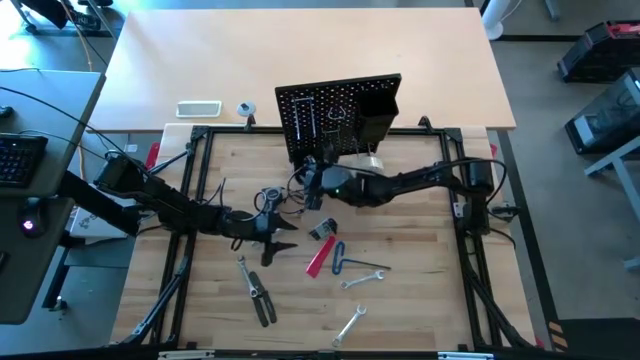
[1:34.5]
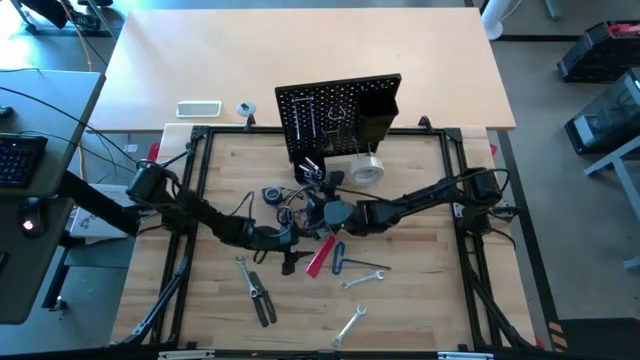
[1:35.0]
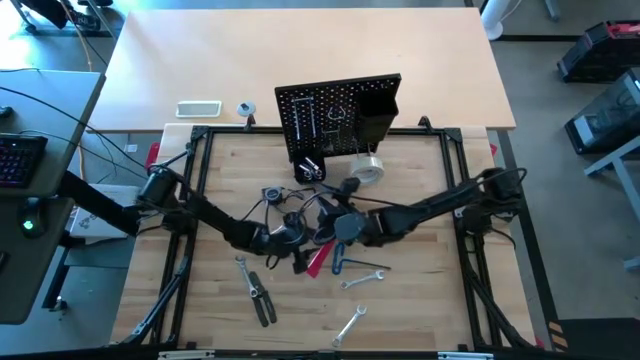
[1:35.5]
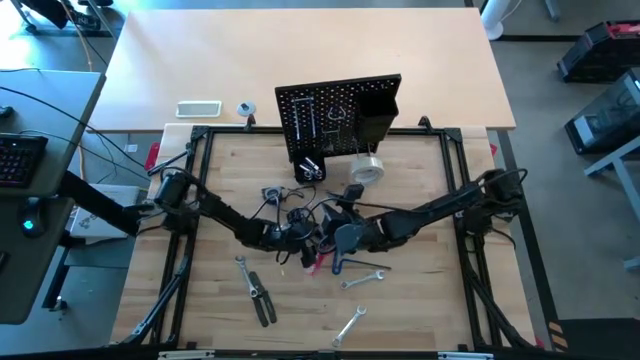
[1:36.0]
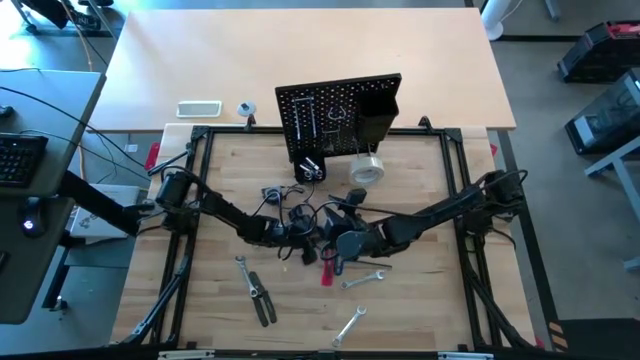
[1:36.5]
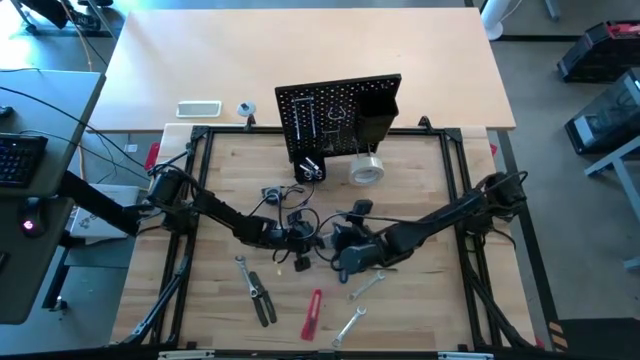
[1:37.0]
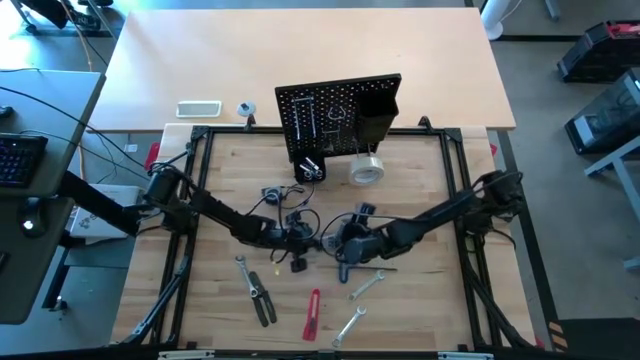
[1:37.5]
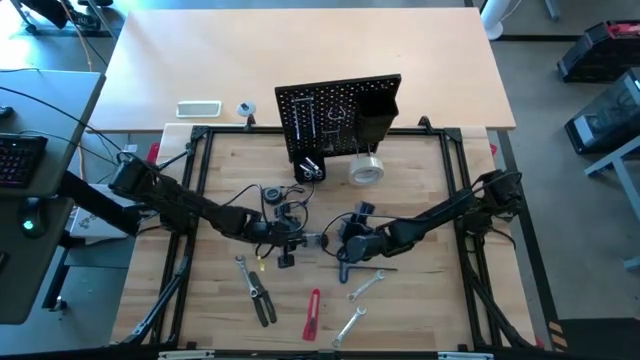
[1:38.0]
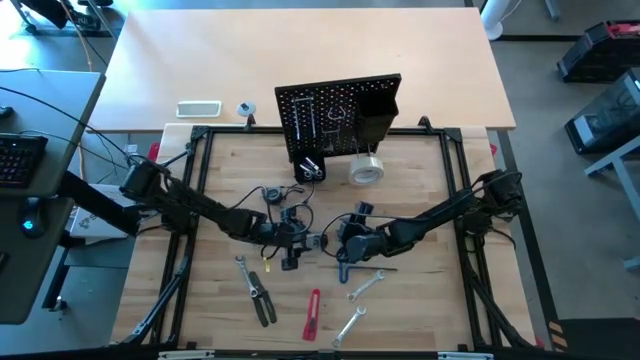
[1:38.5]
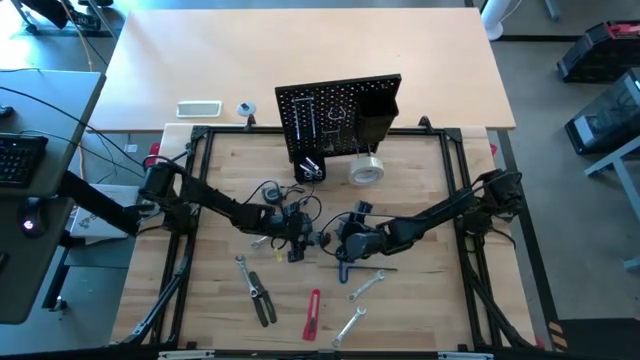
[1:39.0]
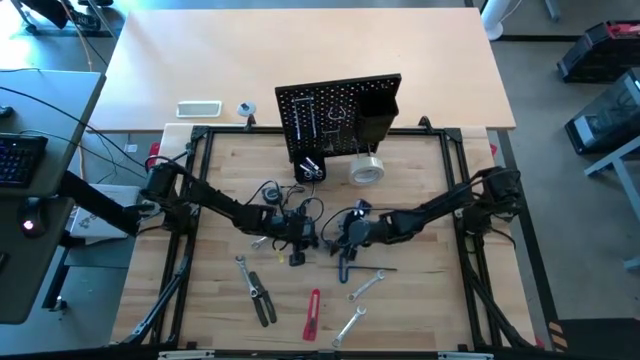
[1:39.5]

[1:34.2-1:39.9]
Task: Hang tools onto peg board
Put the set of hex keys into the bottom black bin on the peg board

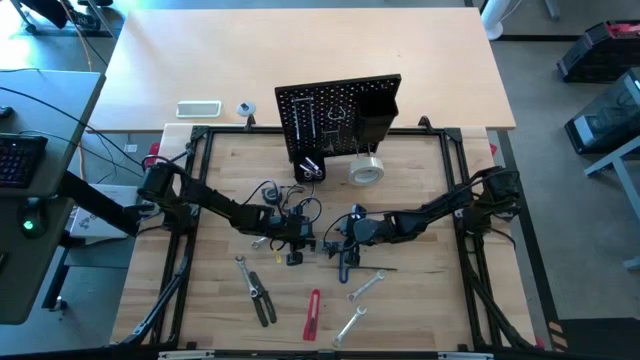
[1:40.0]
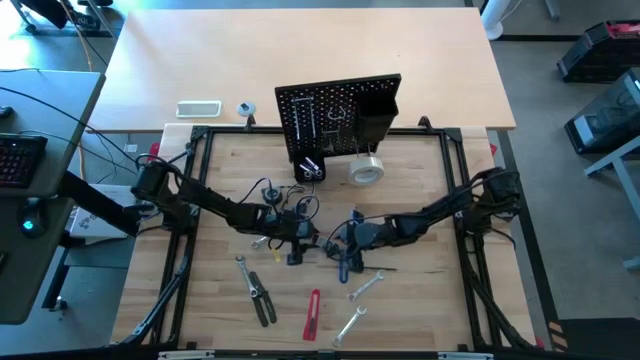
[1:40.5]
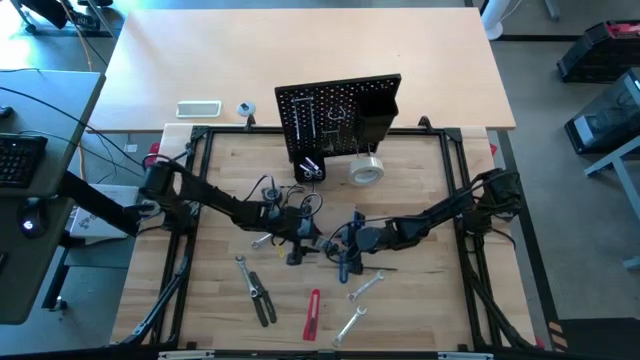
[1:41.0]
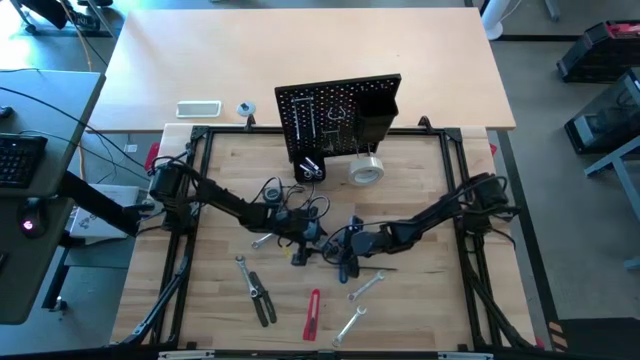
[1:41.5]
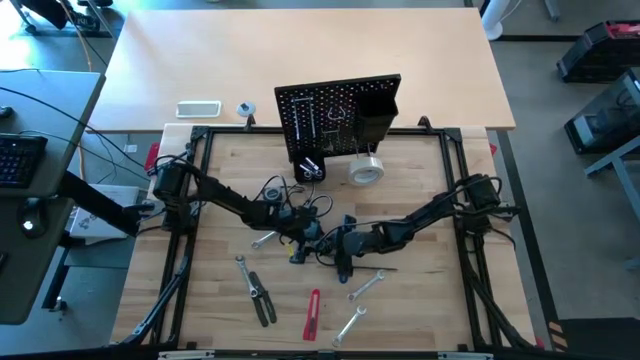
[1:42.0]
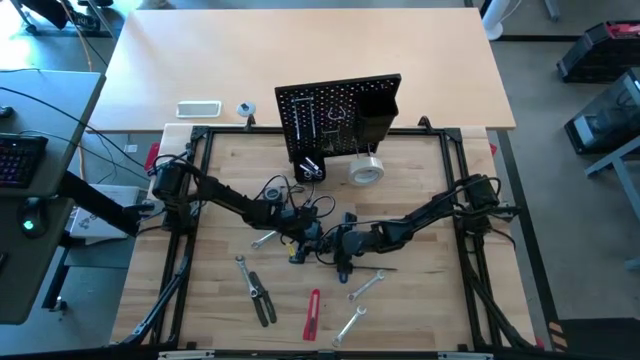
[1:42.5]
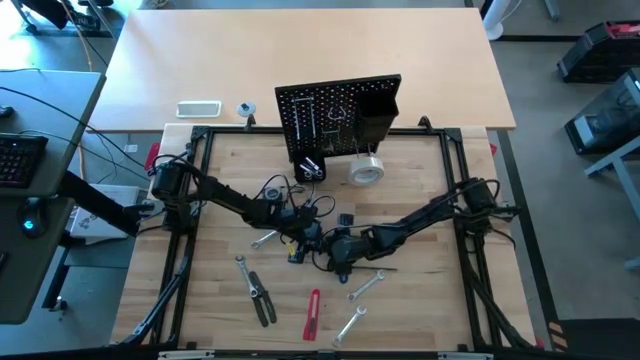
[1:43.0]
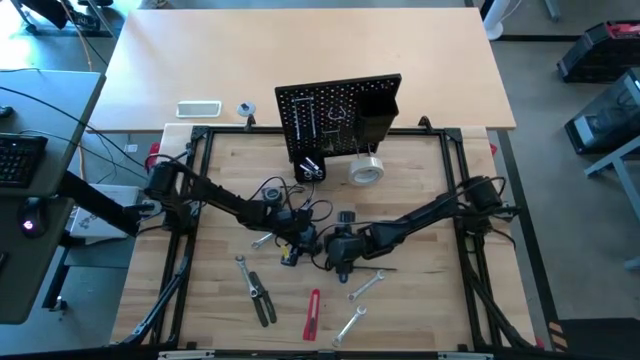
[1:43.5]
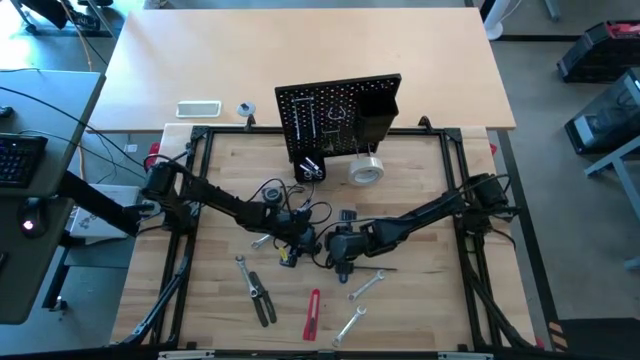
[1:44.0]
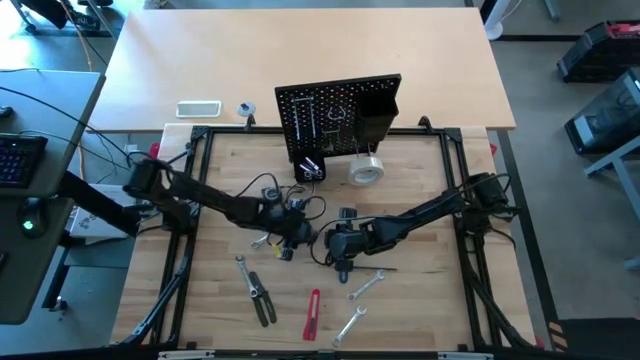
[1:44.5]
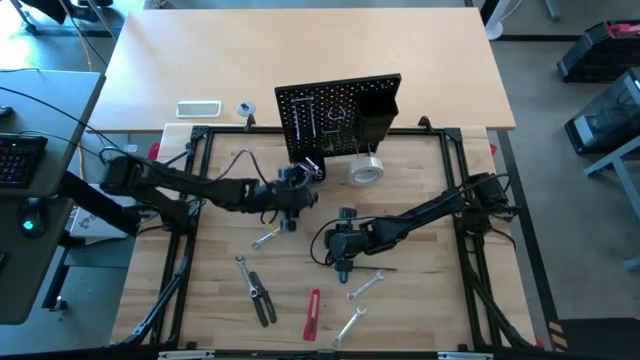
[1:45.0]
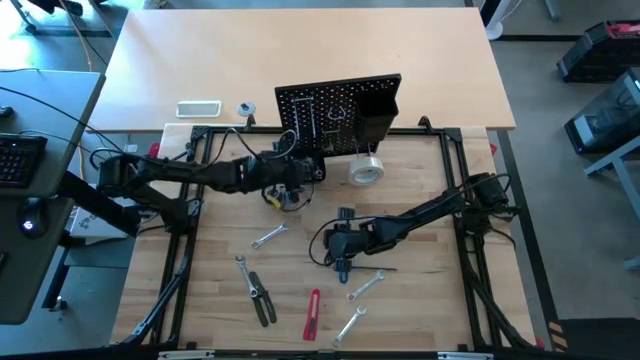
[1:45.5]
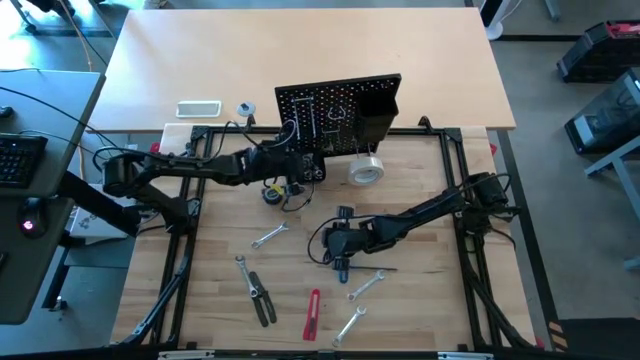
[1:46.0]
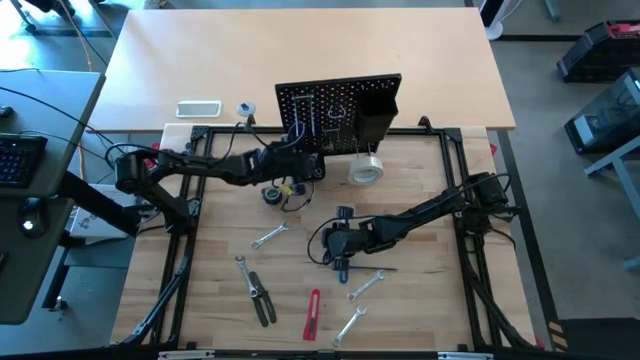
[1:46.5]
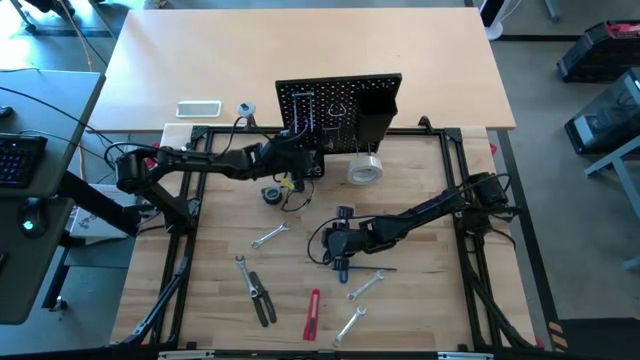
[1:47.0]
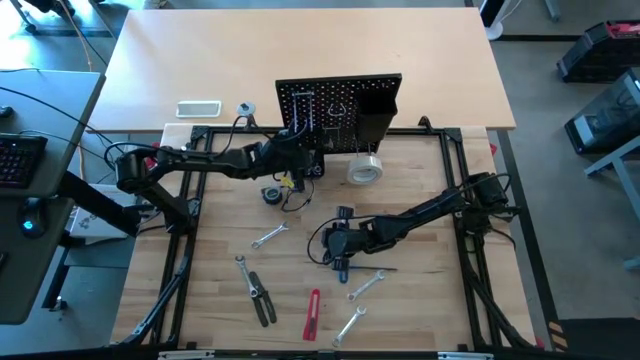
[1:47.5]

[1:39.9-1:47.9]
Put the set of hex keys into the bottom black bin on the peg board

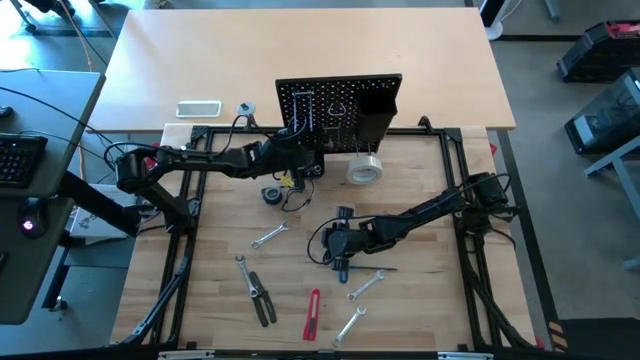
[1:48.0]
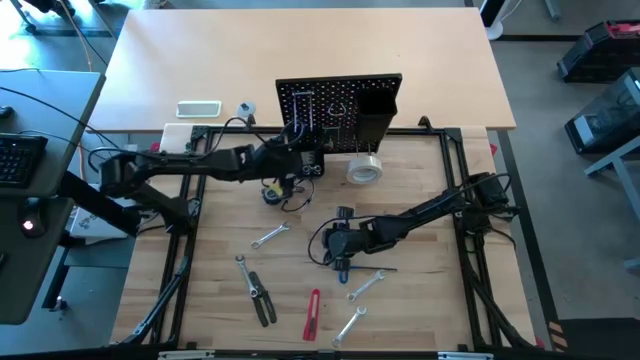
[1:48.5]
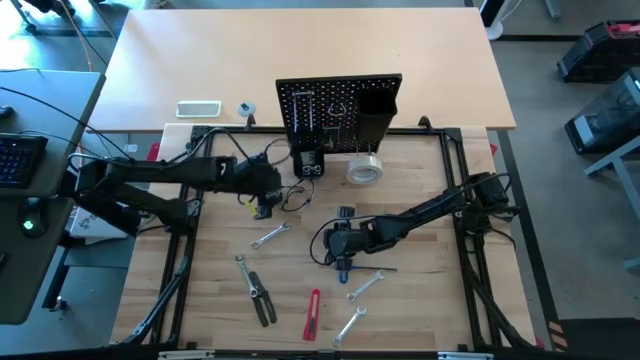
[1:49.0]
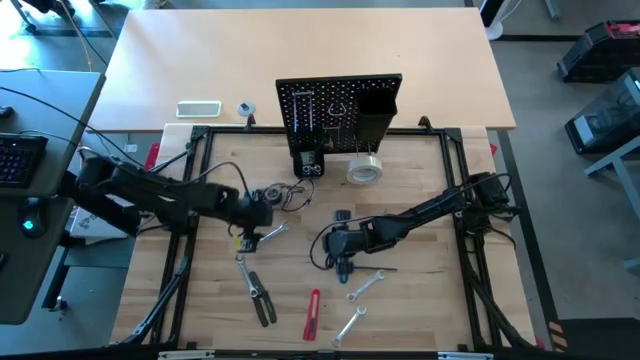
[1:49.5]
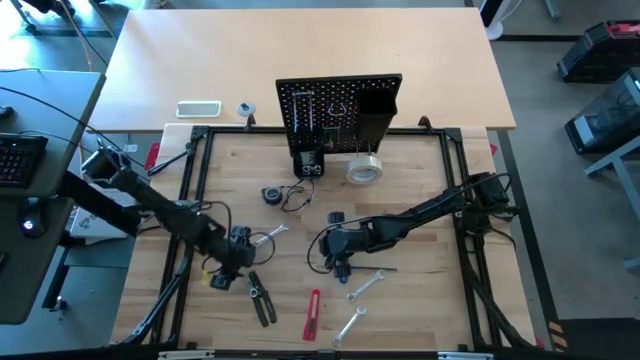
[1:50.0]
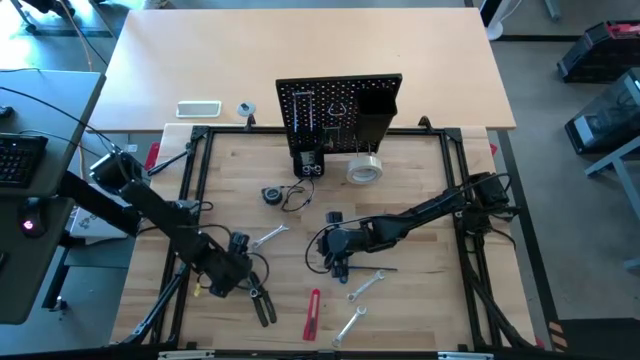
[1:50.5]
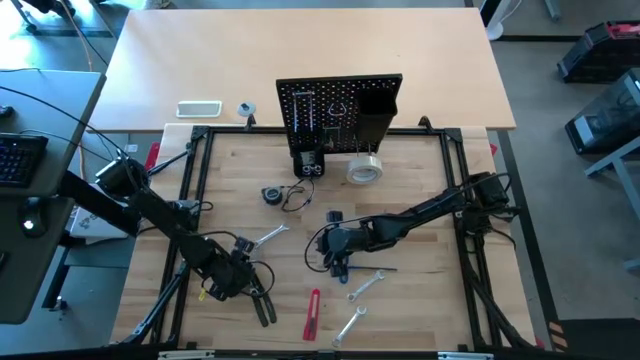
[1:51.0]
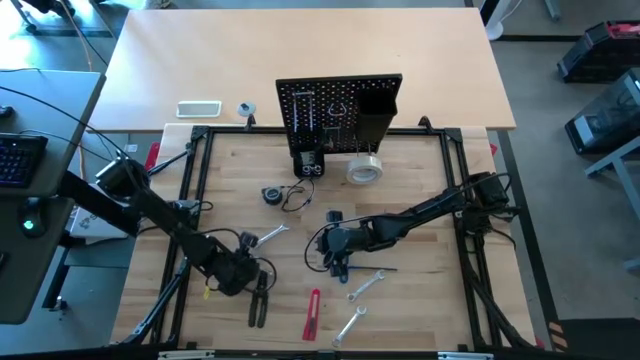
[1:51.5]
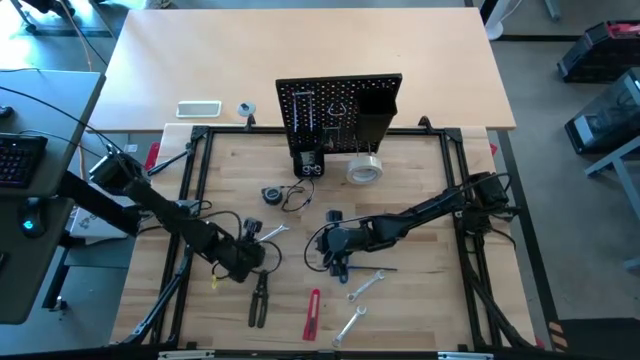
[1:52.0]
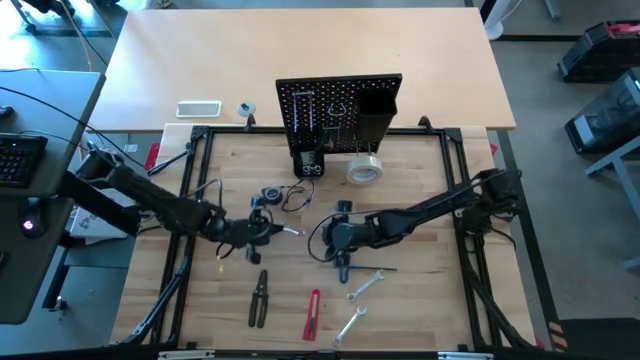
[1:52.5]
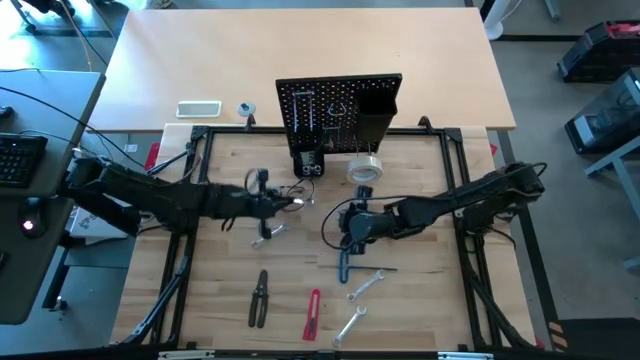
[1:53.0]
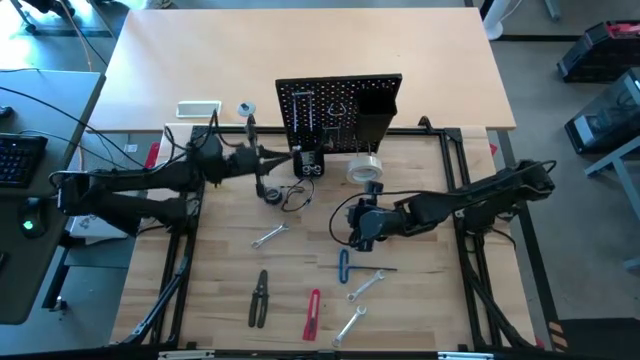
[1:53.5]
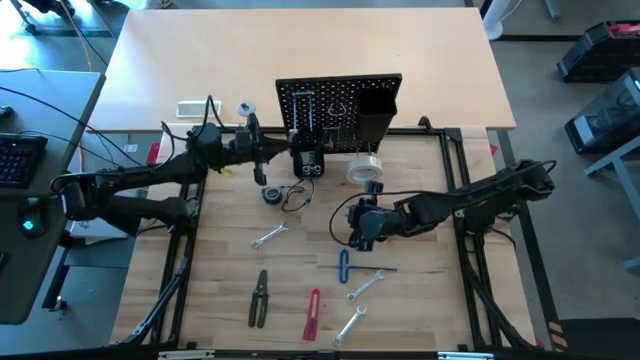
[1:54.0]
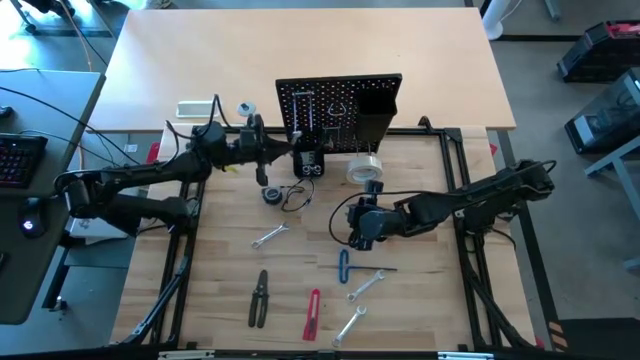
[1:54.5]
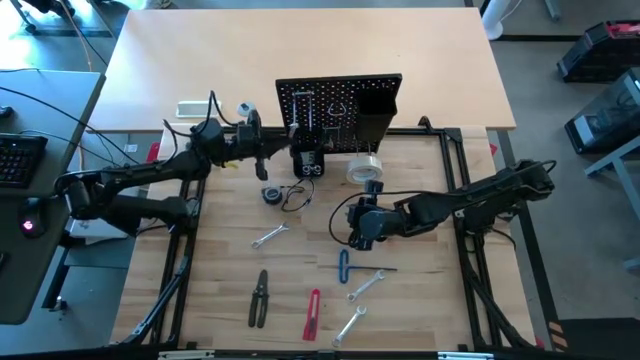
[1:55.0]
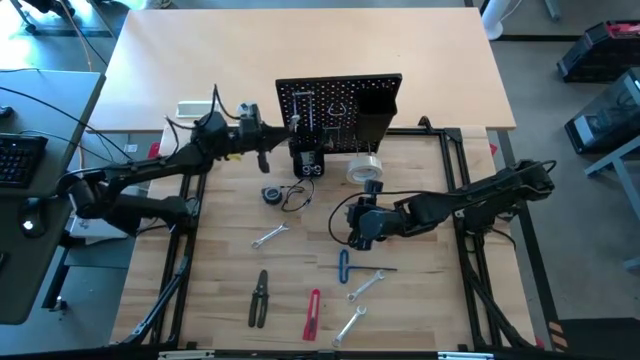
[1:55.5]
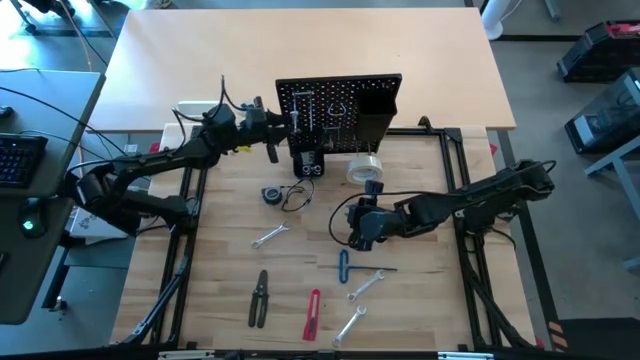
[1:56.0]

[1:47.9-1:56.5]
Hang the middle left wrench on the pegboard

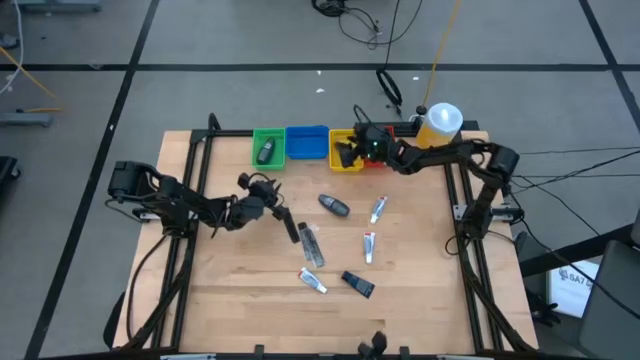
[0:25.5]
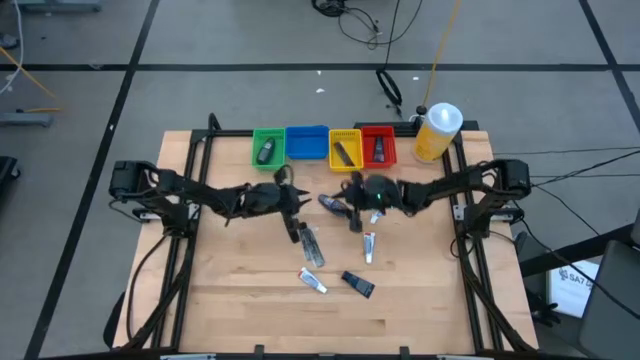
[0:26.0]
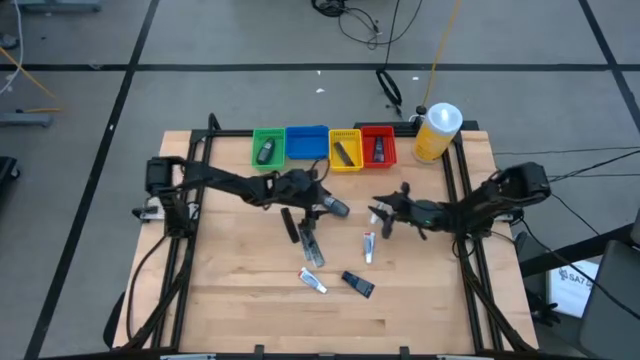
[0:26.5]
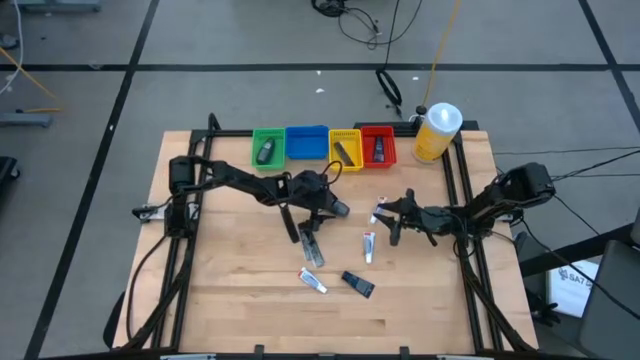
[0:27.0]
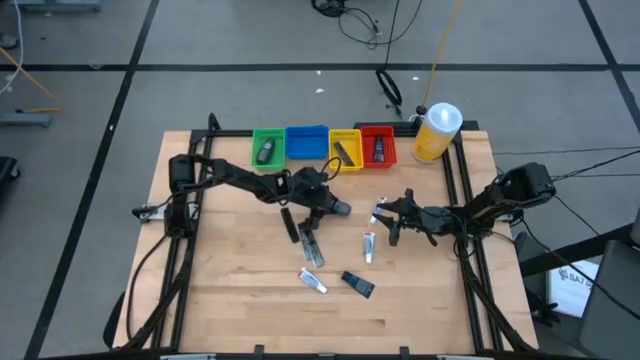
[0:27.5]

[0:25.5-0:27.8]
Task: Pick & Place Travel size toiletries
Put the black deodorant into the green bin
